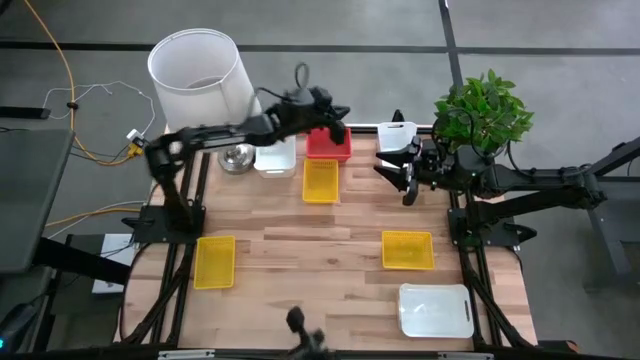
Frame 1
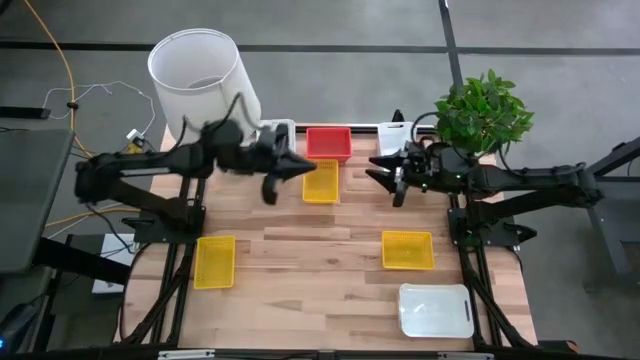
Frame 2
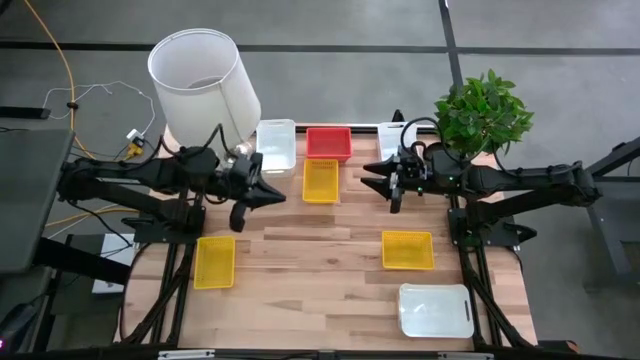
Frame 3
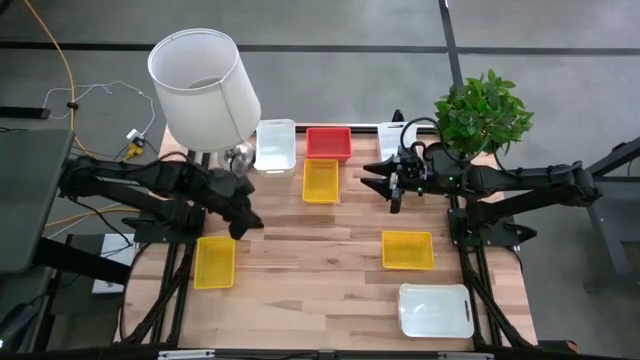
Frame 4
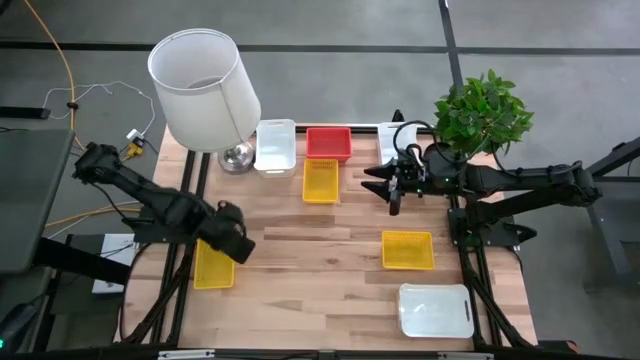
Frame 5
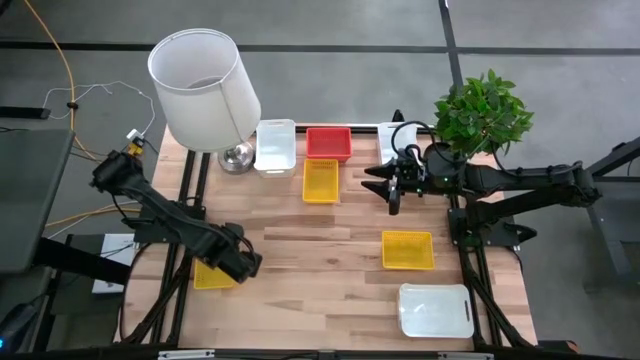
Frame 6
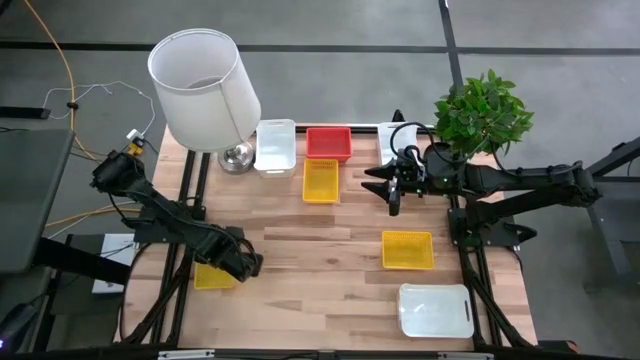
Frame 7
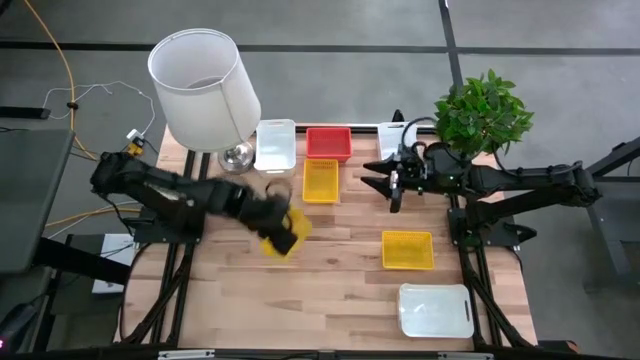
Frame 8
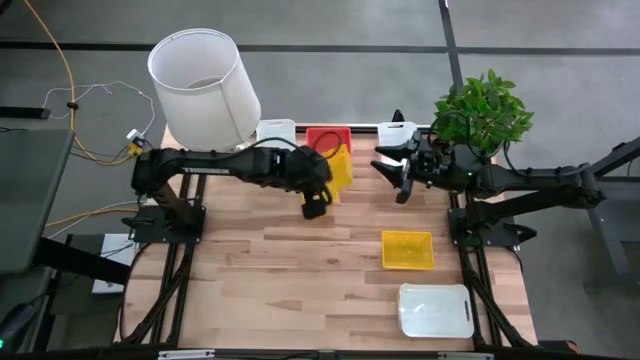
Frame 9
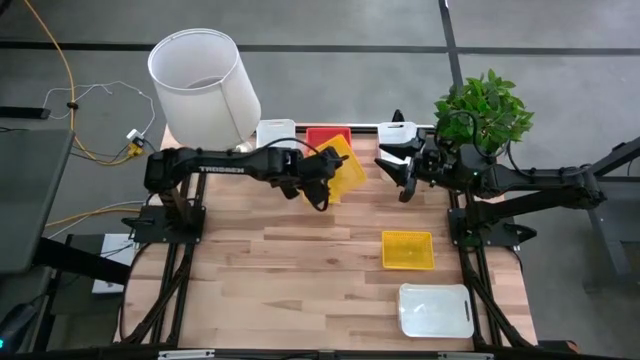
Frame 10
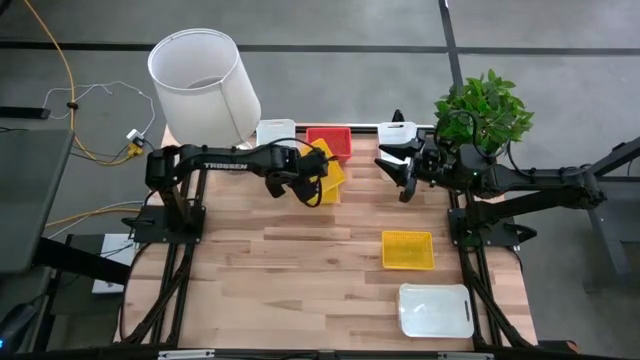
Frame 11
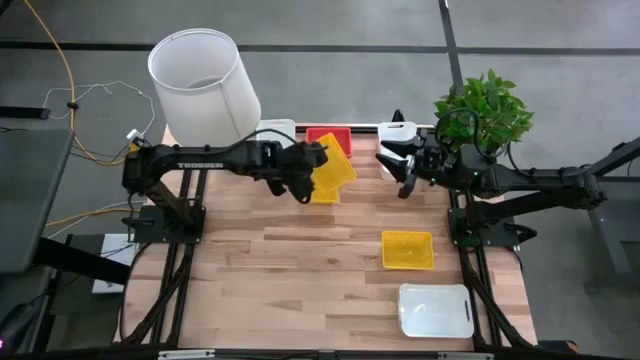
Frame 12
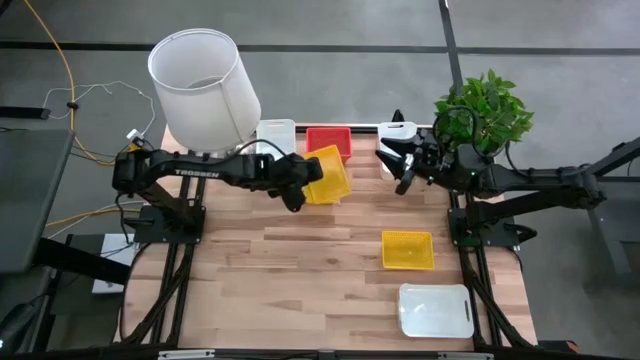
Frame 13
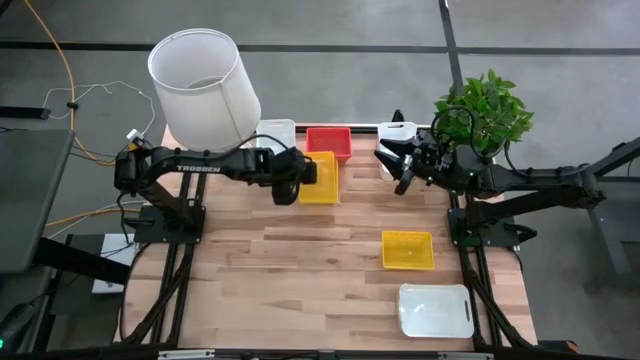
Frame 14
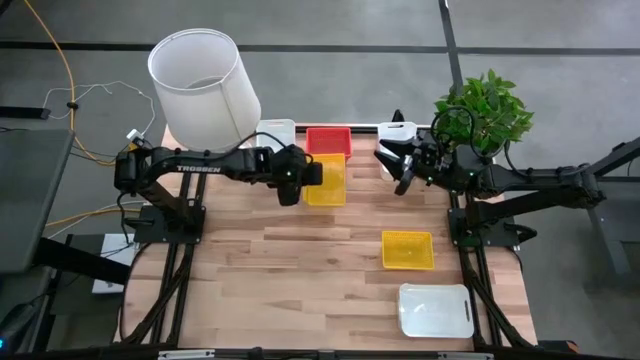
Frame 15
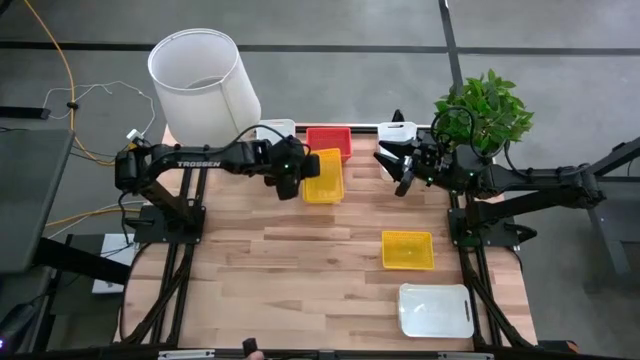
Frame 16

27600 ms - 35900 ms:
Stack the bottom left yellow bin on the top yellow bin

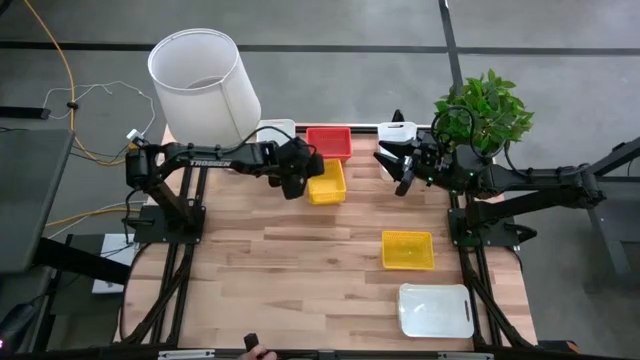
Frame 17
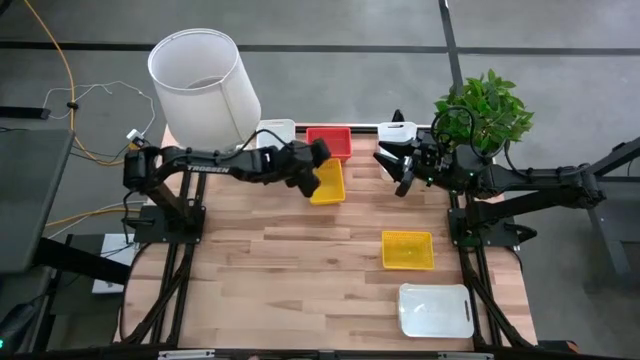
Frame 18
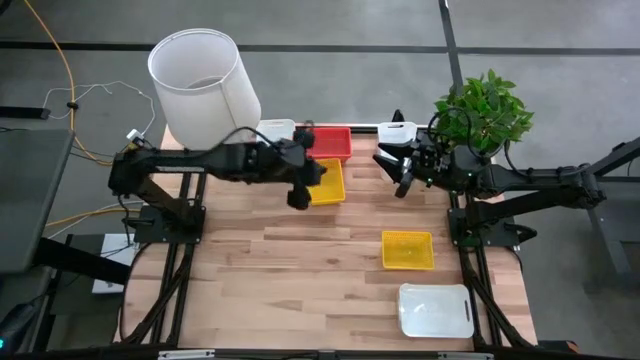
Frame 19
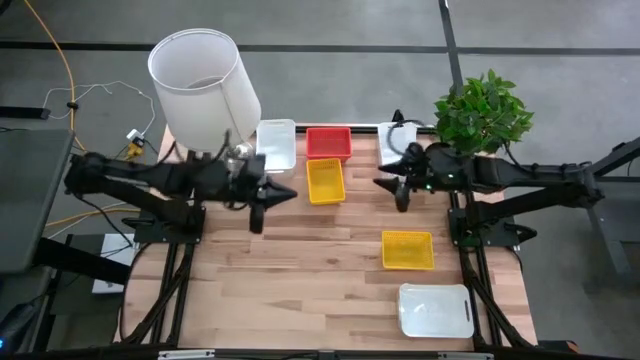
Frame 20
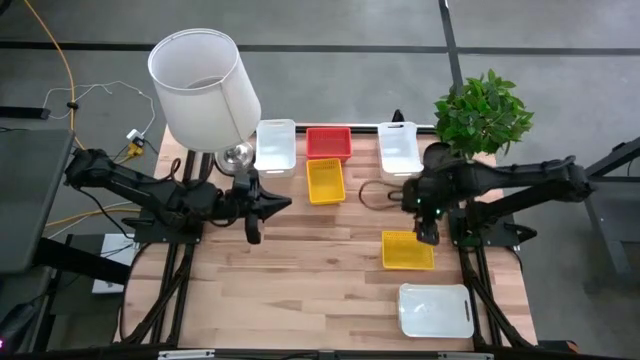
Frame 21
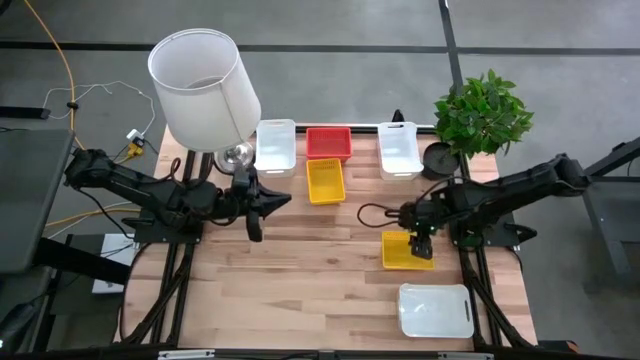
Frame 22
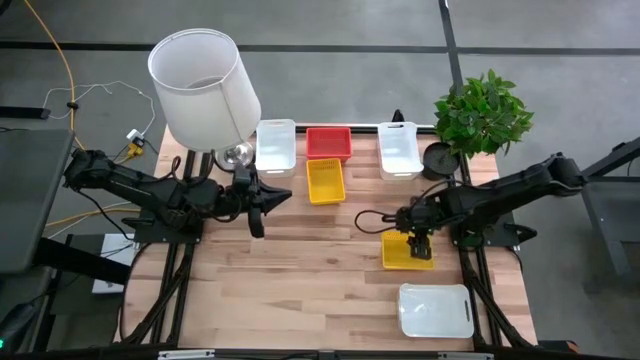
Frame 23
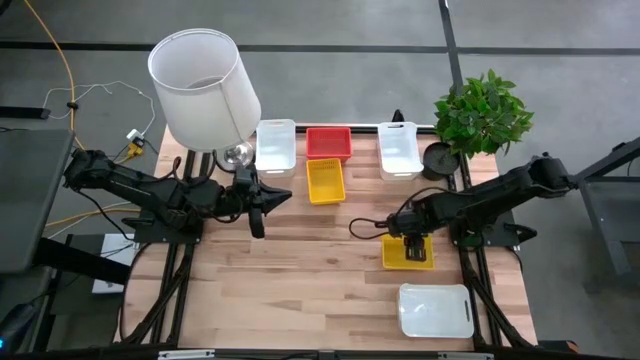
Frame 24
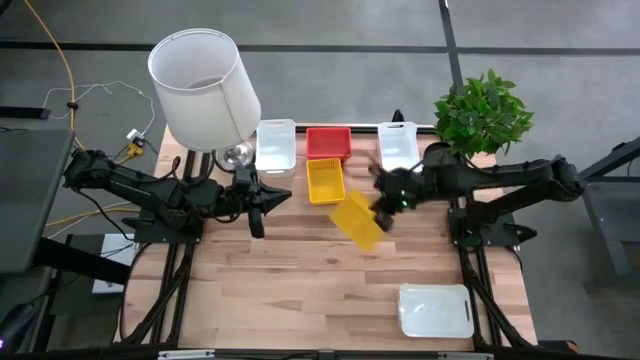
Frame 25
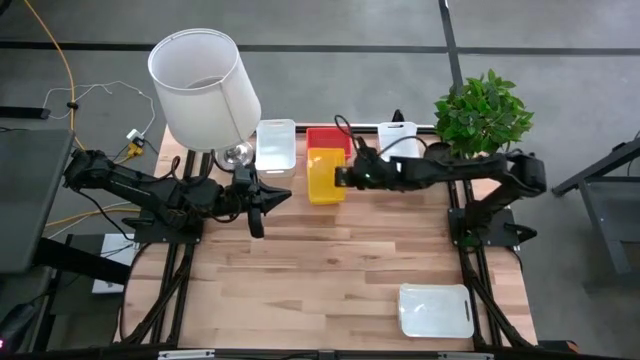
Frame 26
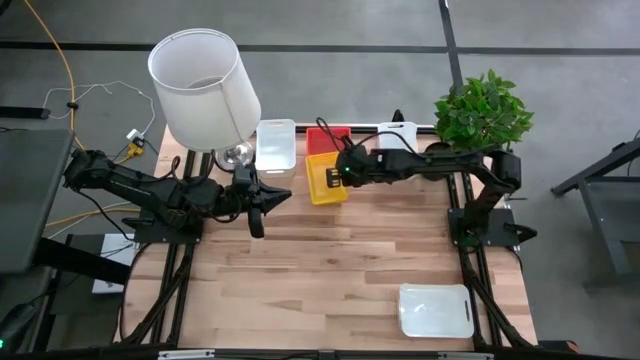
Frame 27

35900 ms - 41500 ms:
Stack the bottom yellow bin on the yellow bin

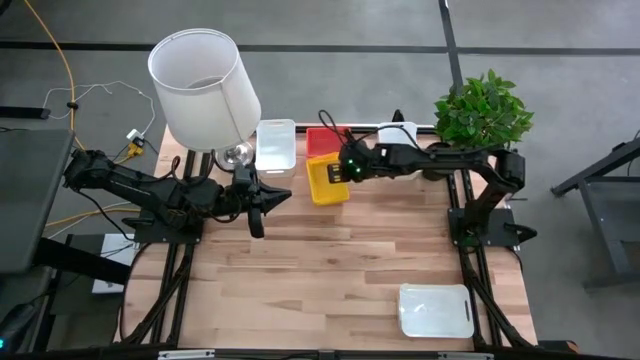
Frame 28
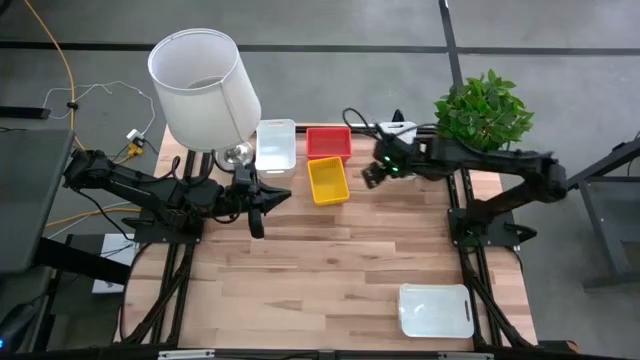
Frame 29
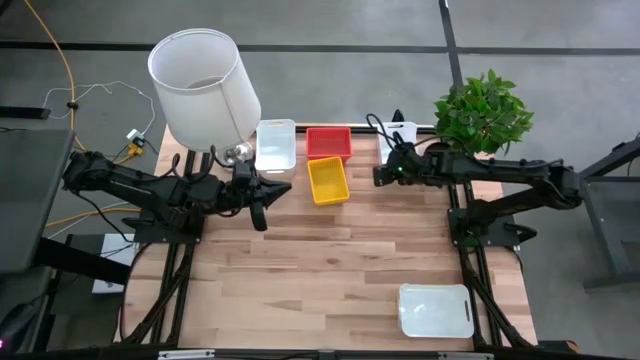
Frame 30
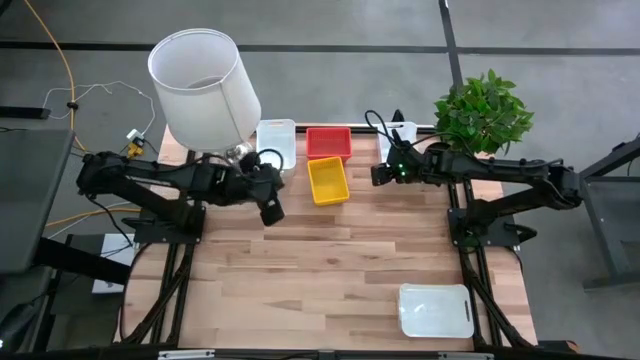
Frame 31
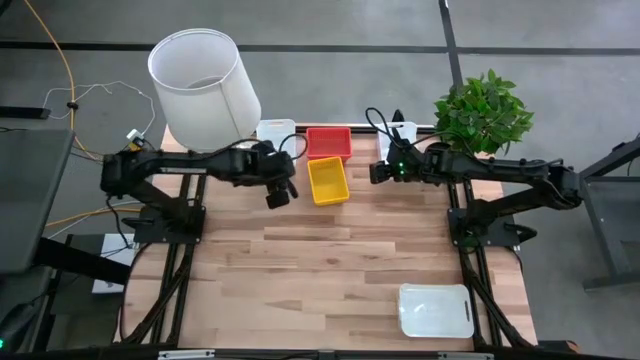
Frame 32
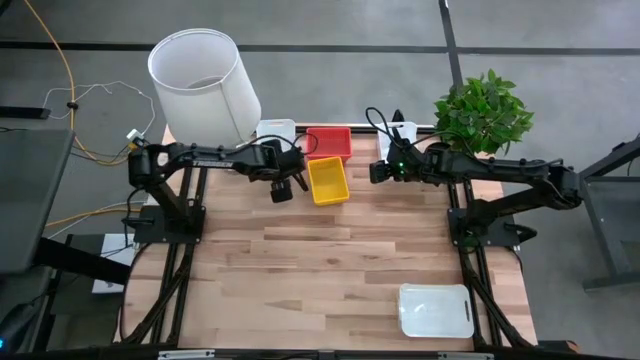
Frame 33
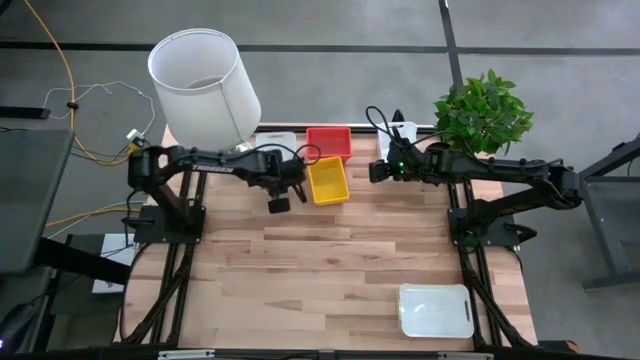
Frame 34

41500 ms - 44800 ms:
Move the top left white bin to the center of the table

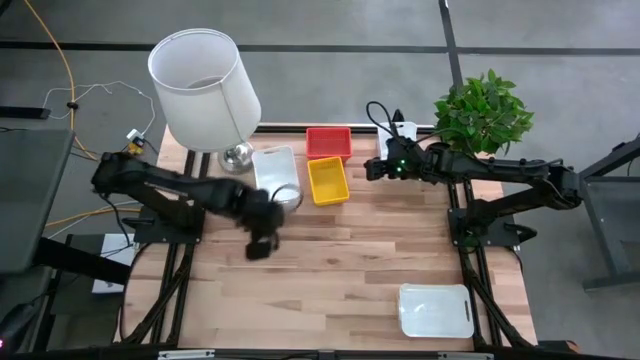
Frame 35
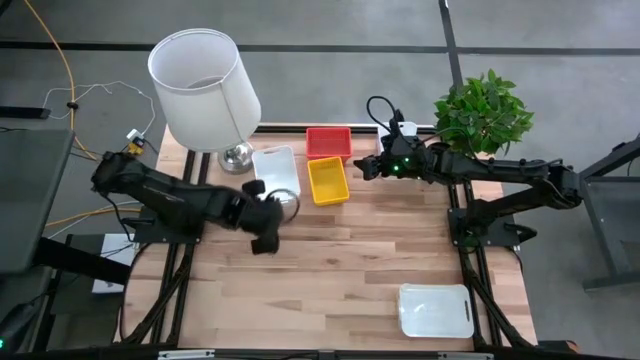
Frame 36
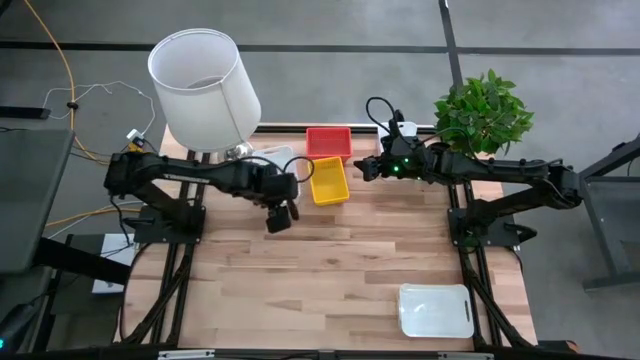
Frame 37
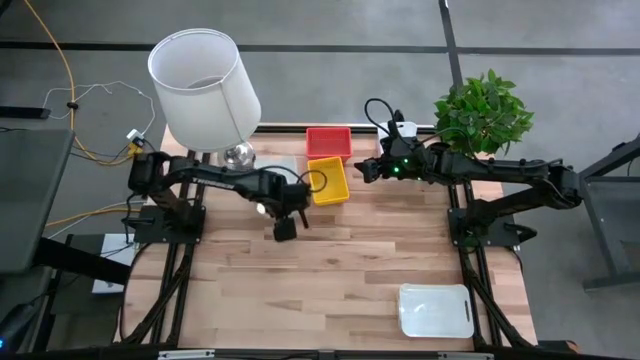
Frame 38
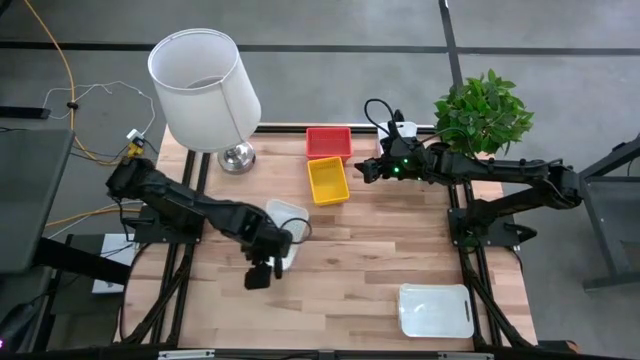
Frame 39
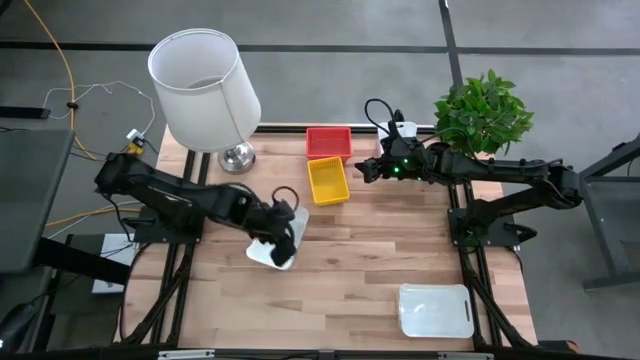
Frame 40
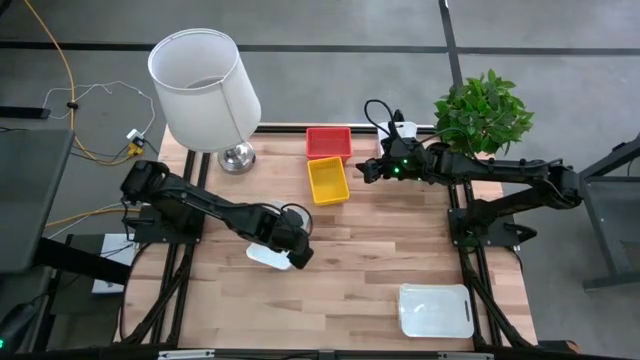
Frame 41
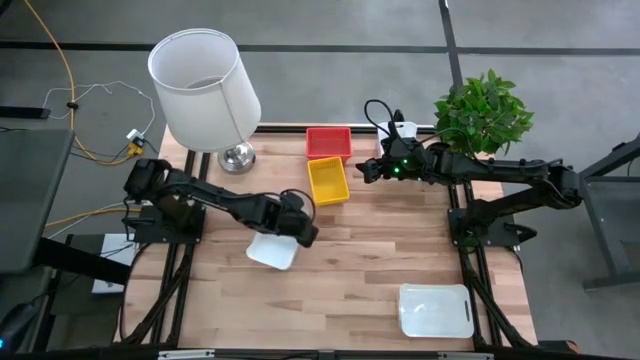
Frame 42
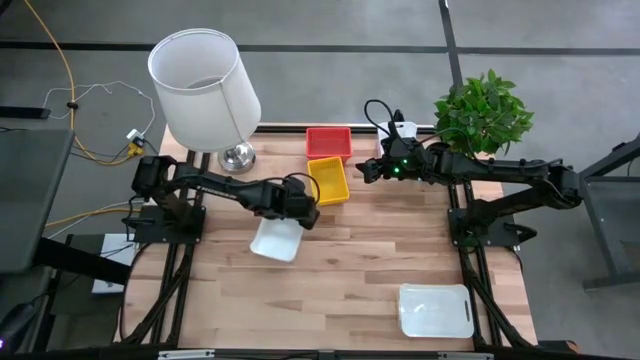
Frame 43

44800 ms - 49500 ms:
Move the top left white bin to the center of the table

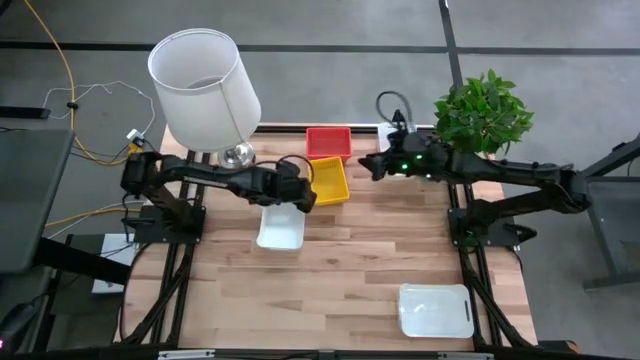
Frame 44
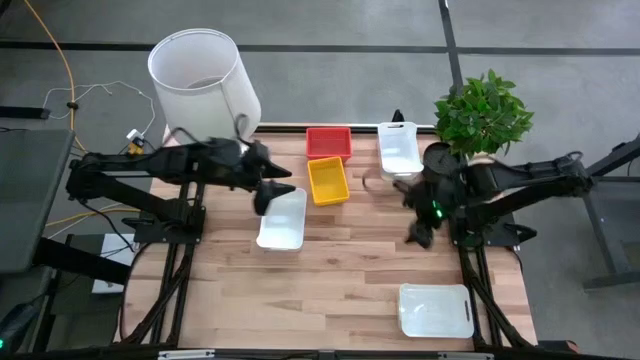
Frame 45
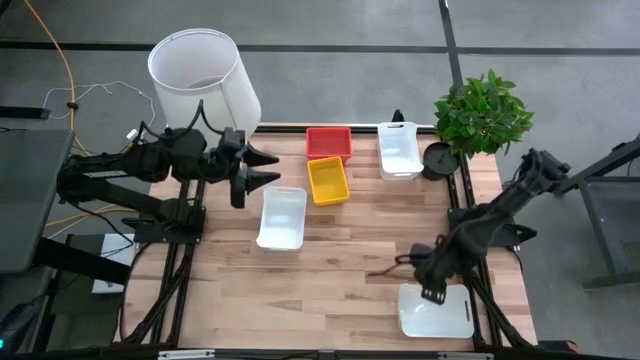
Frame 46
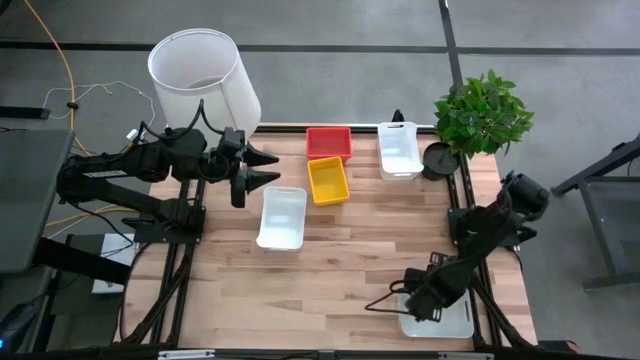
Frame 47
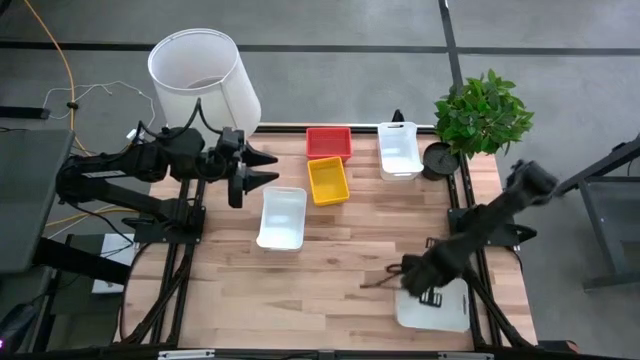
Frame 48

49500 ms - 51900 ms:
Stack the bottom right white bin on the white bin
